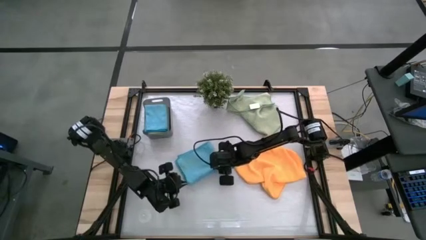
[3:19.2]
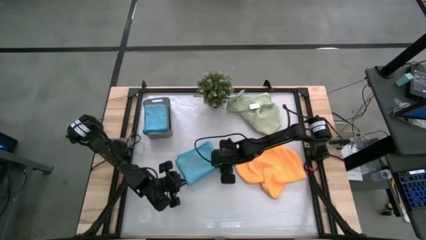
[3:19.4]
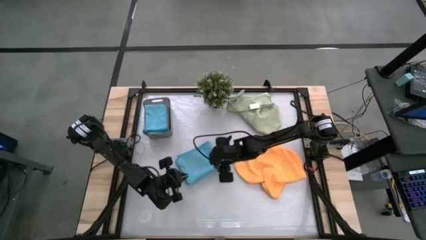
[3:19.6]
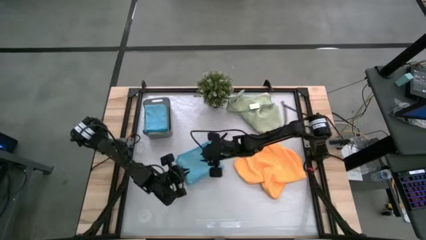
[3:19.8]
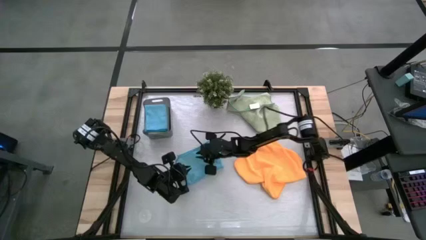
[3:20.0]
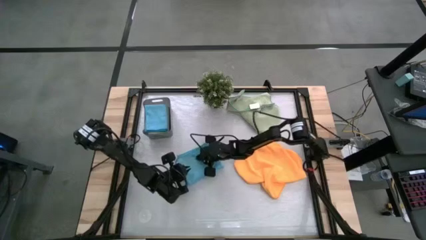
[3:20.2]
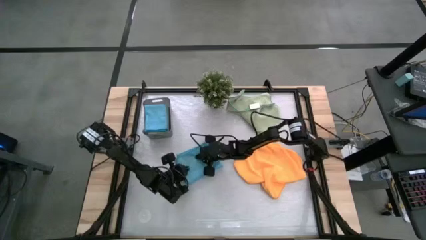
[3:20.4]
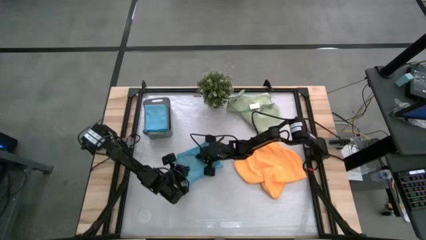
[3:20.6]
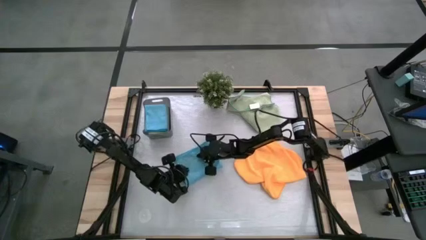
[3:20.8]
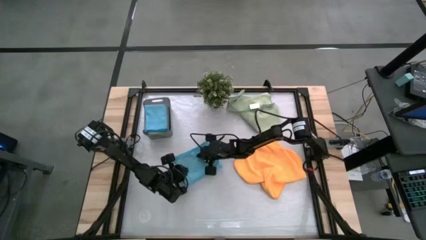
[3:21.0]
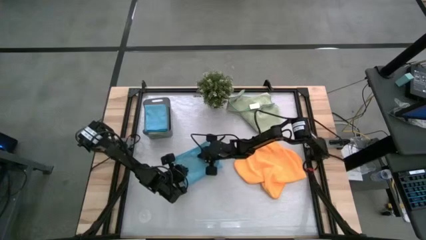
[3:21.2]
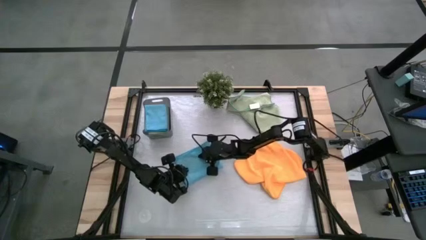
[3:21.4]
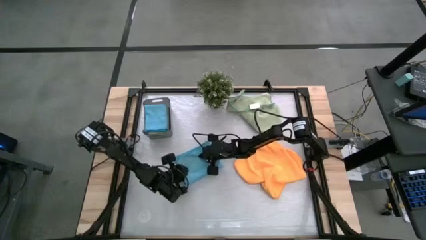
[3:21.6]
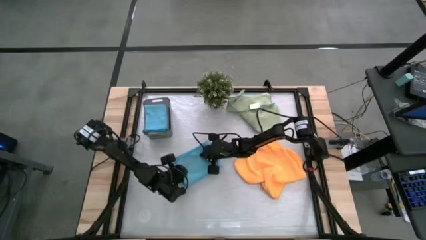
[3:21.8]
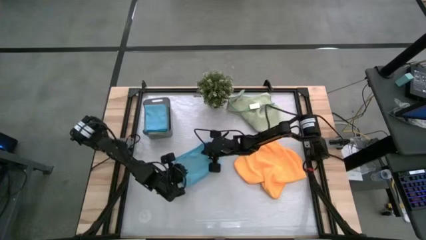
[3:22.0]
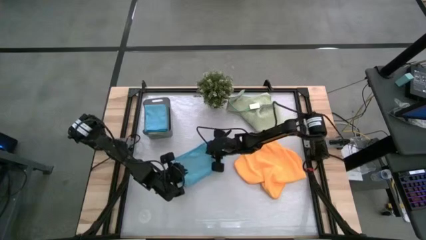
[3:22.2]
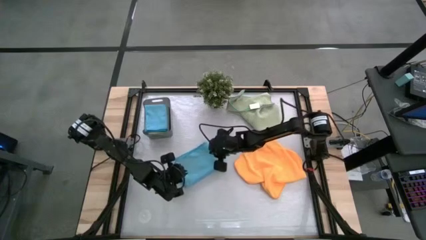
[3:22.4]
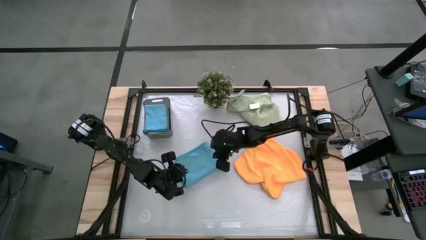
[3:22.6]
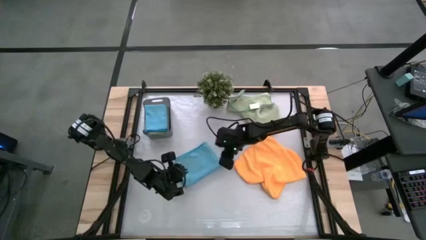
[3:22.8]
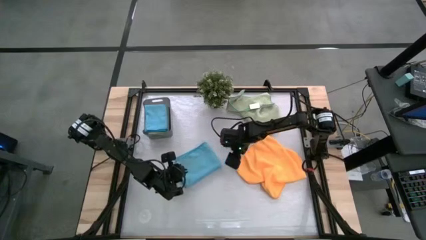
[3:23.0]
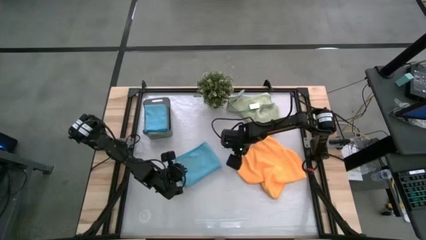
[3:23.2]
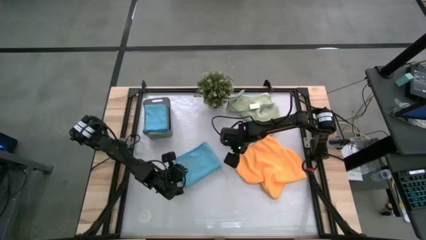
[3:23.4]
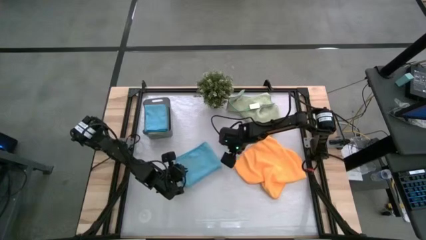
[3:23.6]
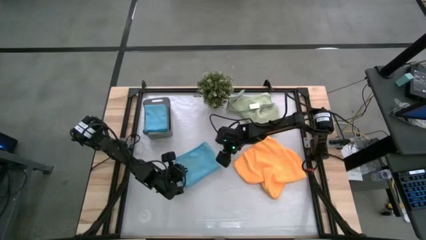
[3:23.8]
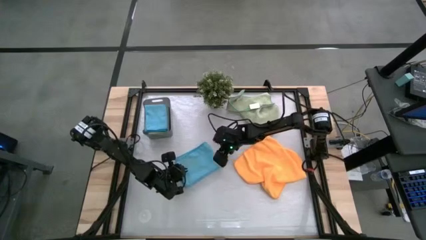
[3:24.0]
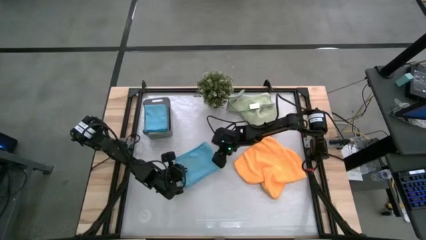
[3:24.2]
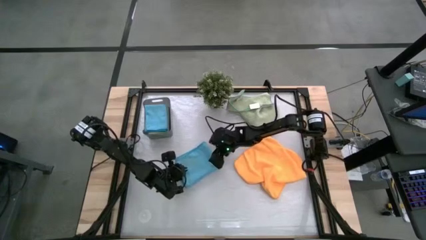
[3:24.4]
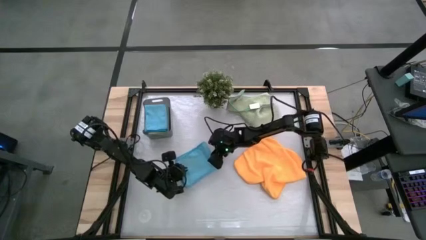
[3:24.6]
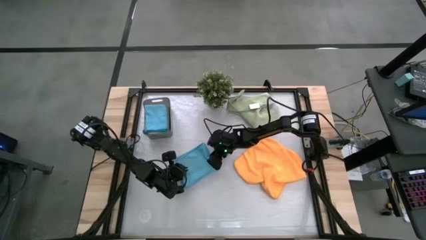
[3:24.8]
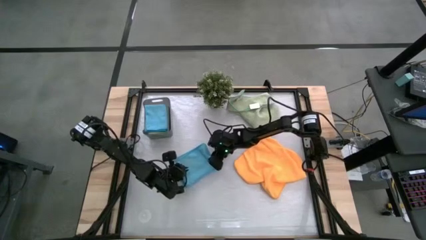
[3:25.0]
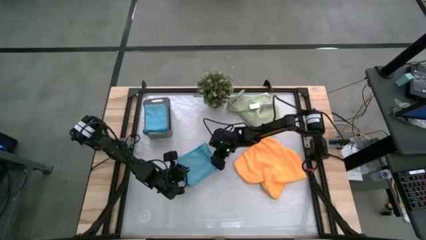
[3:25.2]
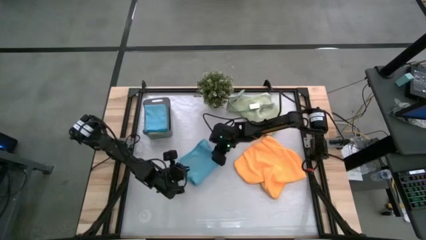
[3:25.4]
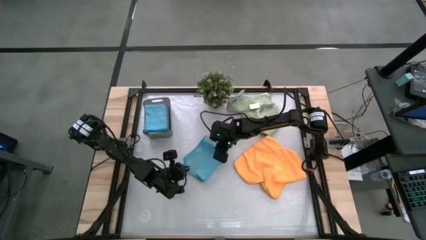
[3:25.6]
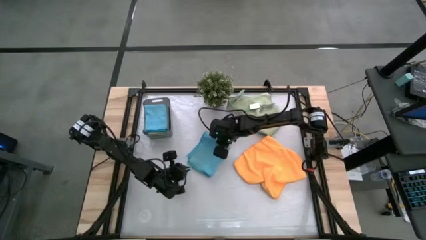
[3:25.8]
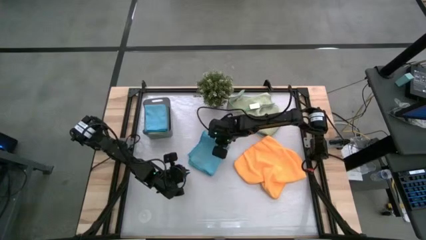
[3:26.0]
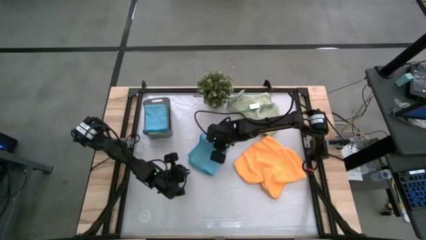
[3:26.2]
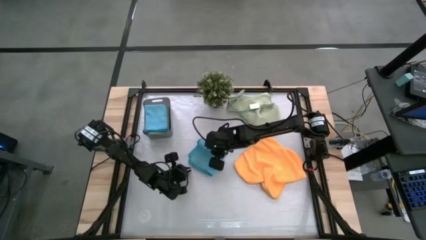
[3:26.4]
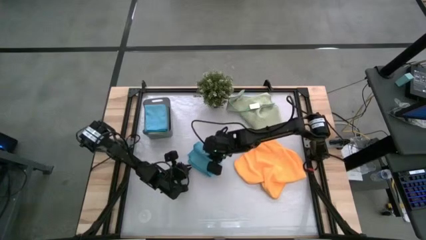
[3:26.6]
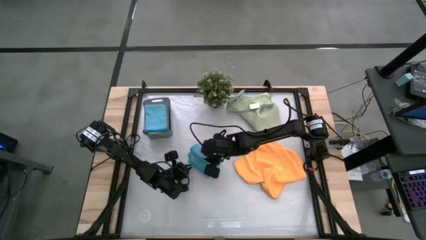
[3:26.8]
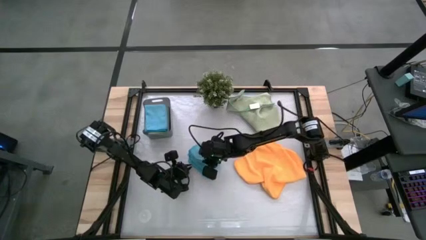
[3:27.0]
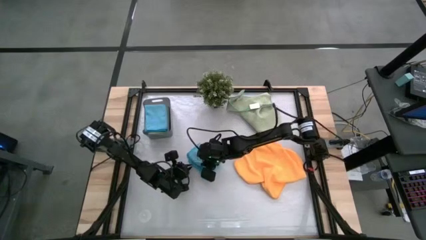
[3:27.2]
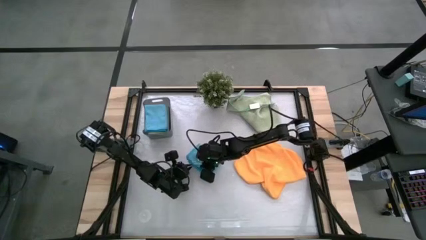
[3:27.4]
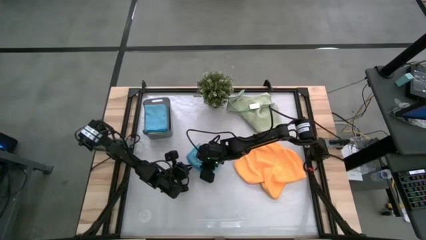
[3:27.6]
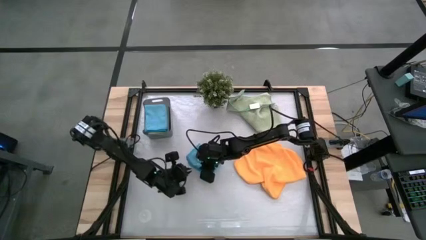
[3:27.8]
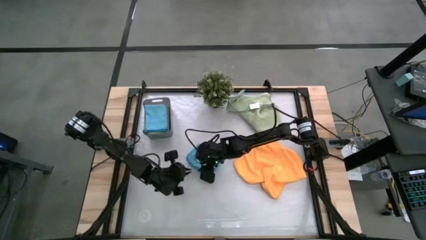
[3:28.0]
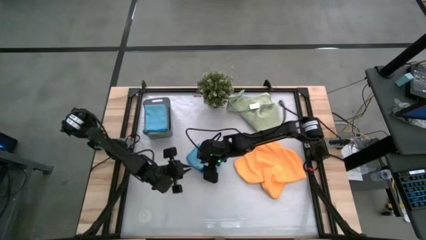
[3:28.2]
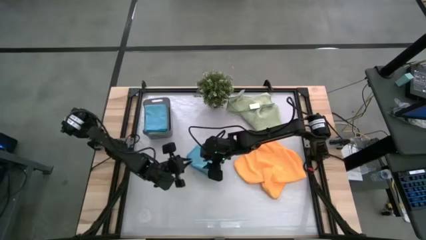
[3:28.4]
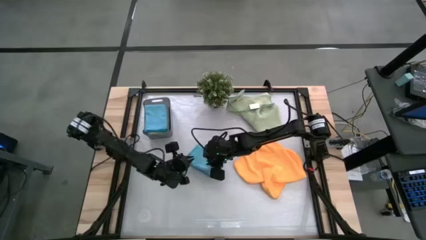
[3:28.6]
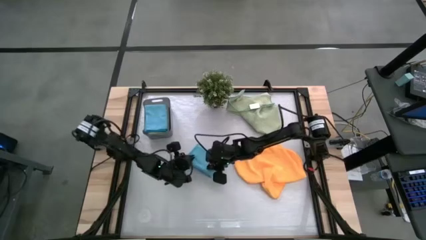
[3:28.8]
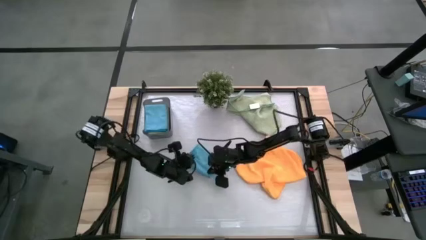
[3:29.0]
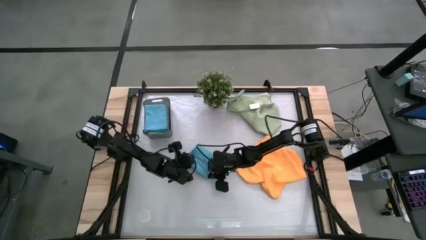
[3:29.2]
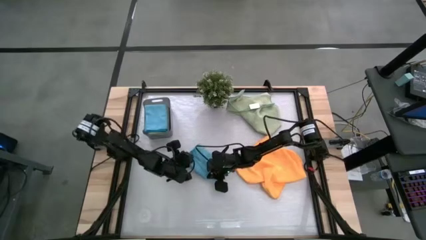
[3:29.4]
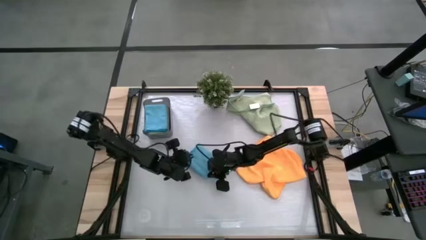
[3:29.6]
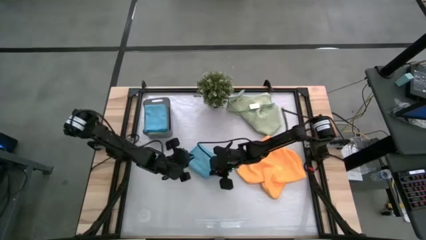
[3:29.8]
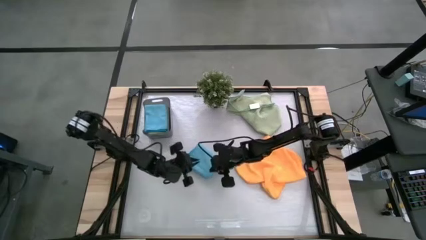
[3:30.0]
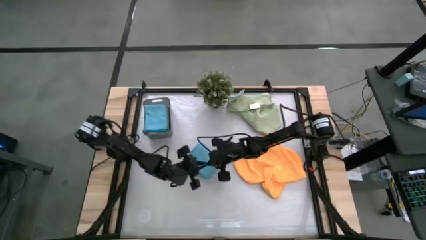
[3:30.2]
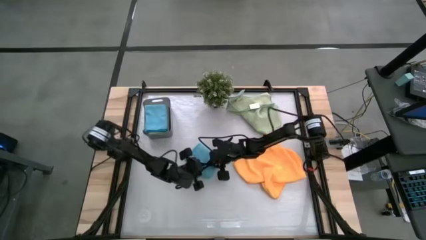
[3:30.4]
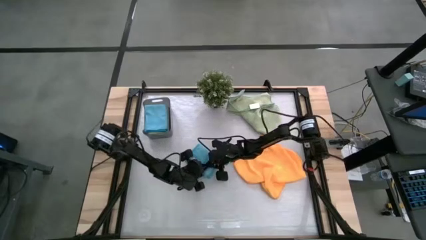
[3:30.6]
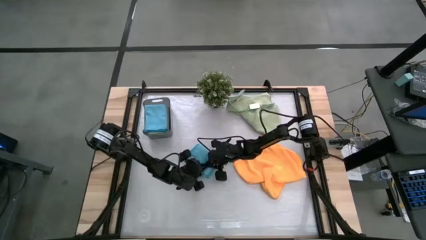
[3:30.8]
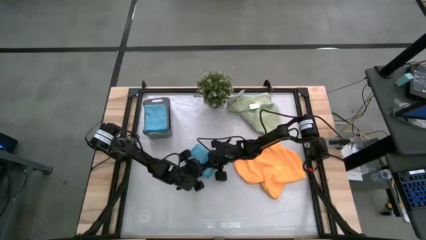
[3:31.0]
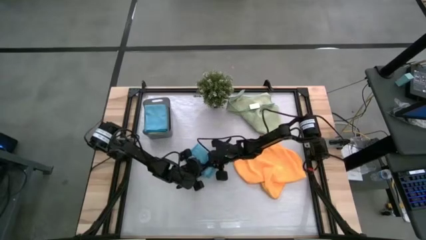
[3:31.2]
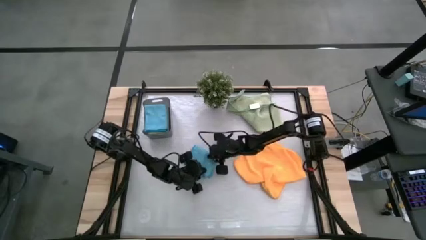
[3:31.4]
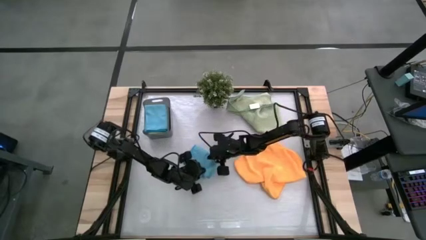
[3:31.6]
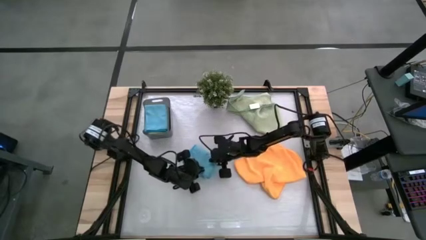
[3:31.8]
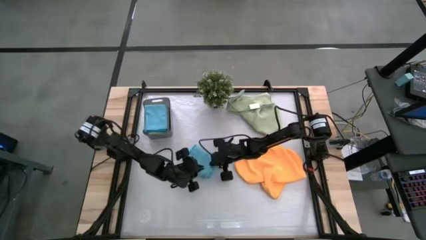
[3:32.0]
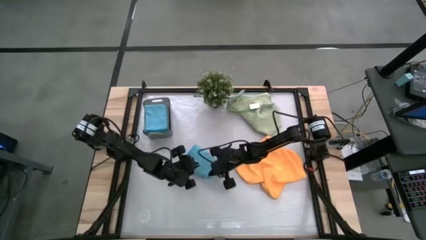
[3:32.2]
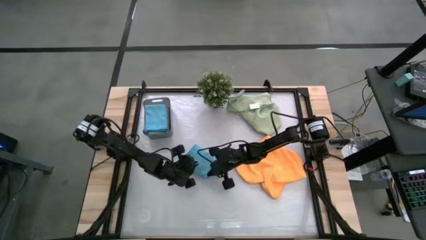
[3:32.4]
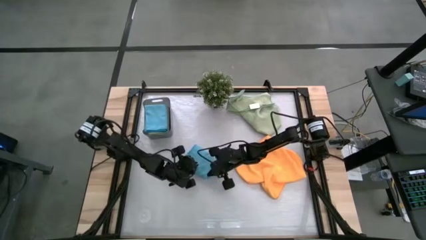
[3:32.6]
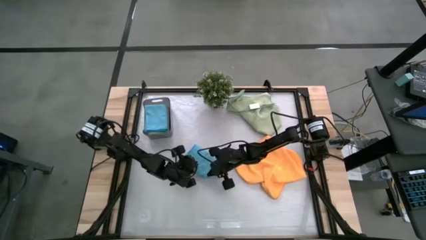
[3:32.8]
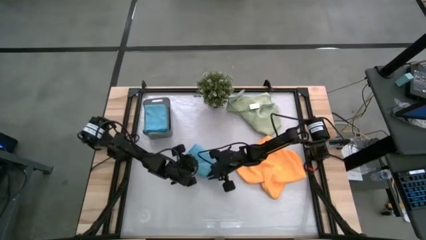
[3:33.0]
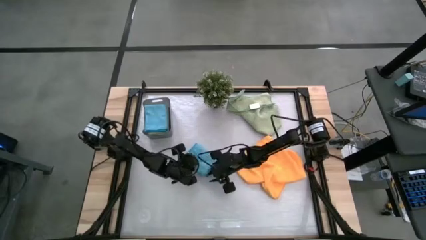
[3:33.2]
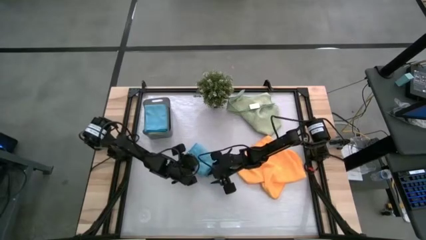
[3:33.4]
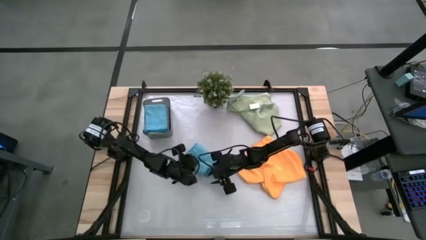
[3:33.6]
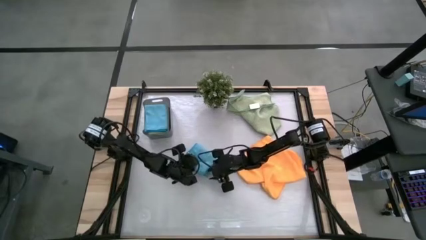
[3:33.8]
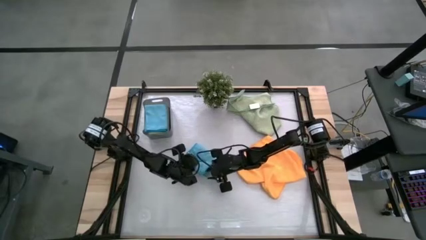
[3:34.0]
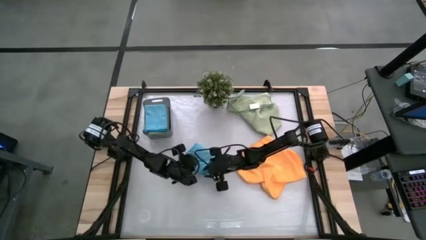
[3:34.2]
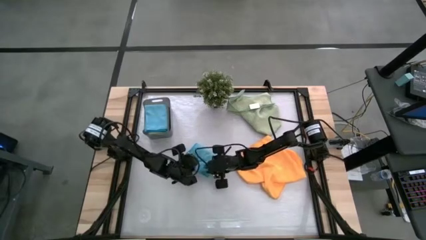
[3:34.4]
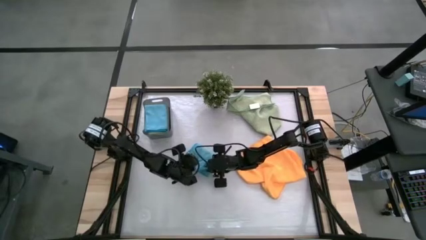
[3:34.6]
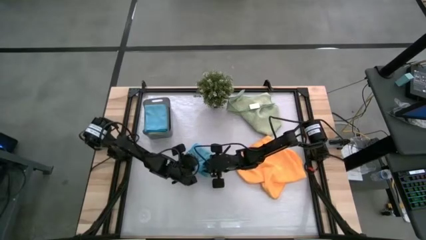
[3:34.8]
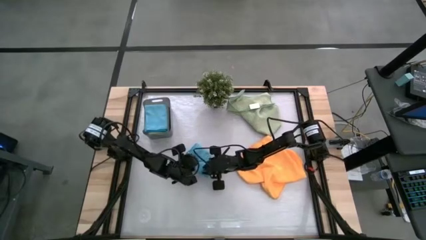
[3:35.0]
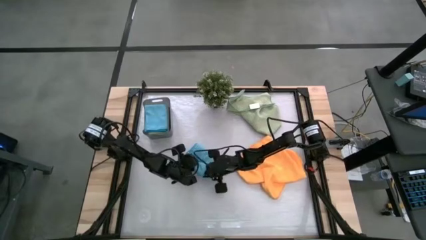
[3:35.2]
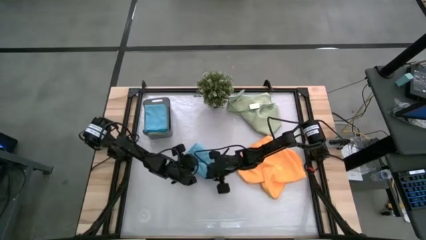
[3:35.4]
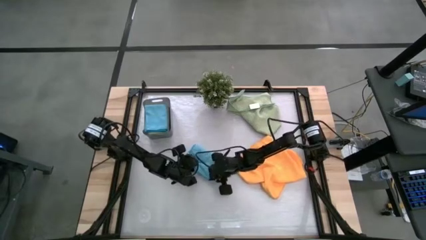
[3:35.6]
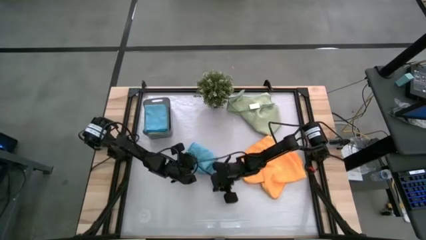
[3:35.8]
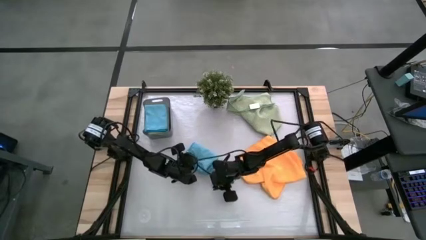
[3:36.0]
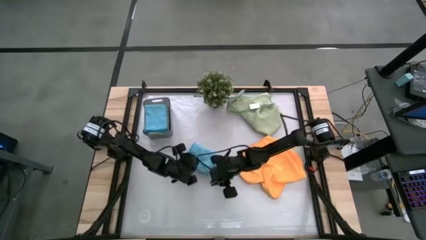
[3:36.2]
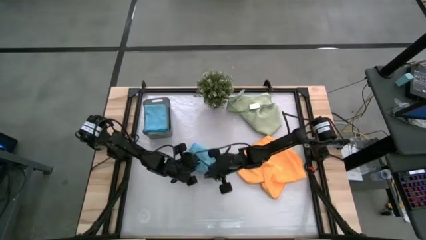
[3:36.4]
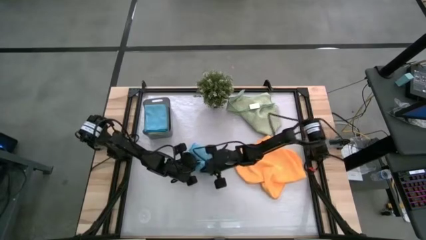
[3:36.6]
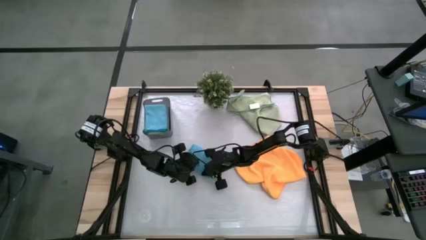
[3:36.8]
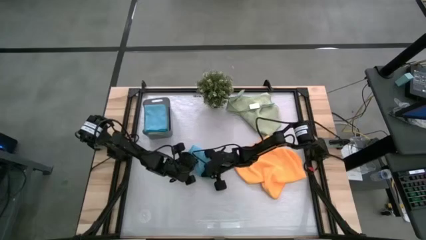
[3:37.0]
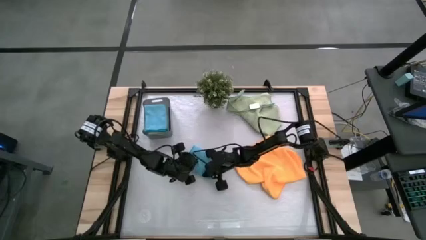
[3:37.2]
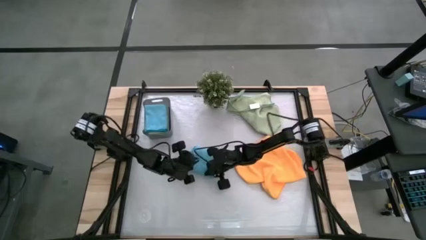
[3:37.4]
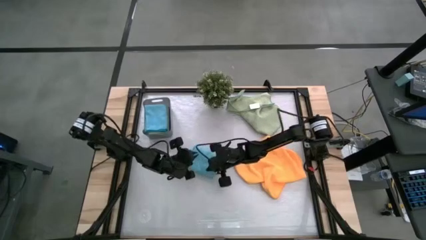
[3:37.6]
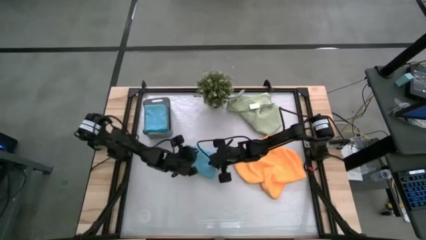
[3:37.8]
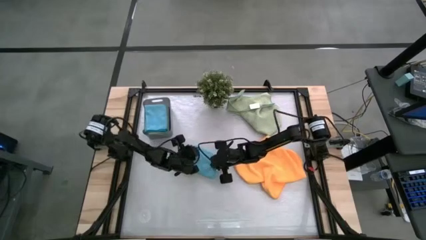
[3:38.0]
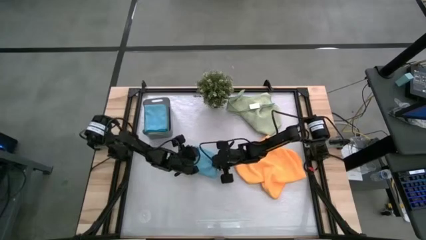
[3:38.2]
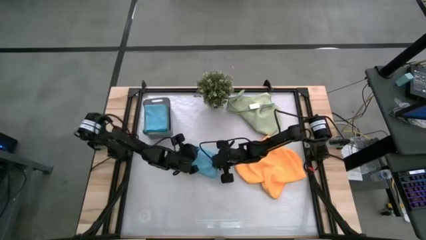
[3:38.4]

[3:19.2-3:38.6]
Task: Fold microfiber towels
Fold the blue microfiber cloth
